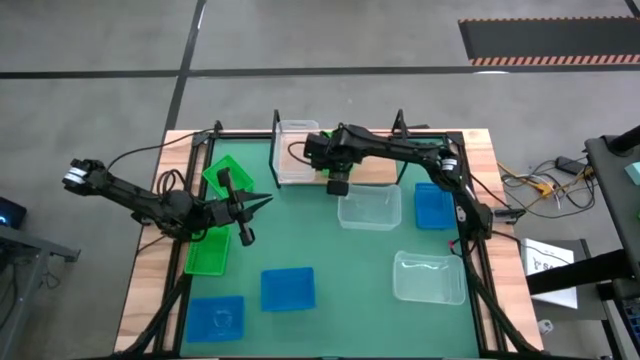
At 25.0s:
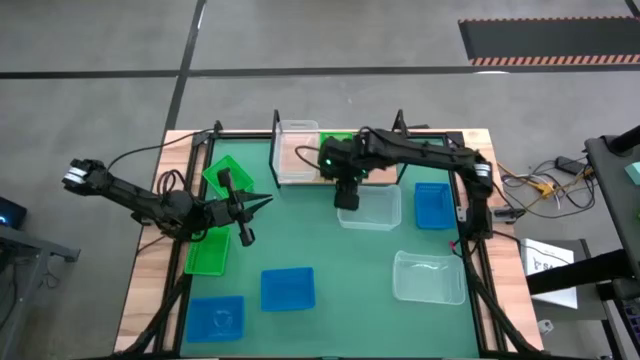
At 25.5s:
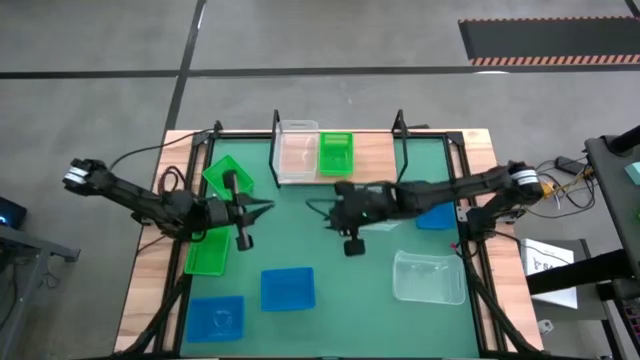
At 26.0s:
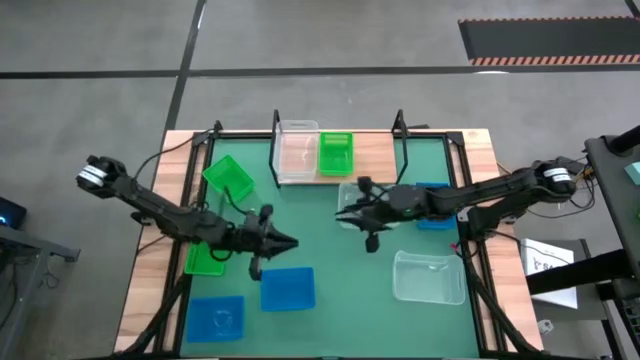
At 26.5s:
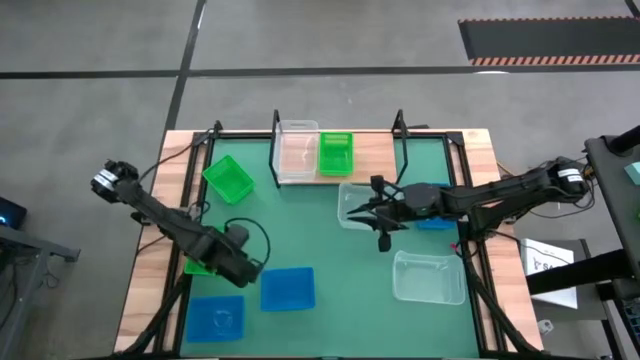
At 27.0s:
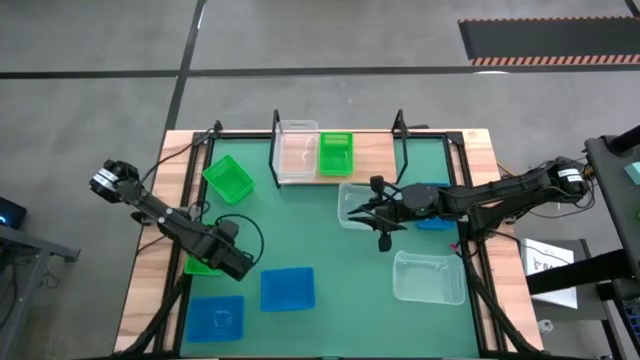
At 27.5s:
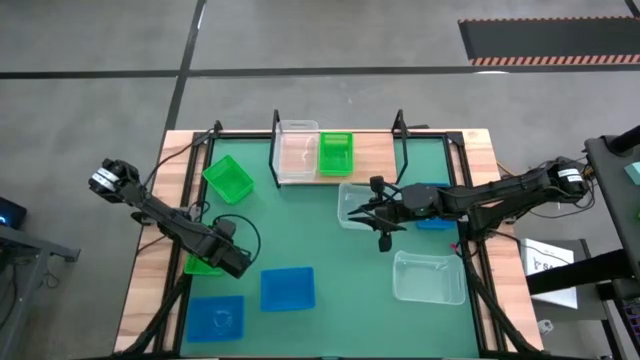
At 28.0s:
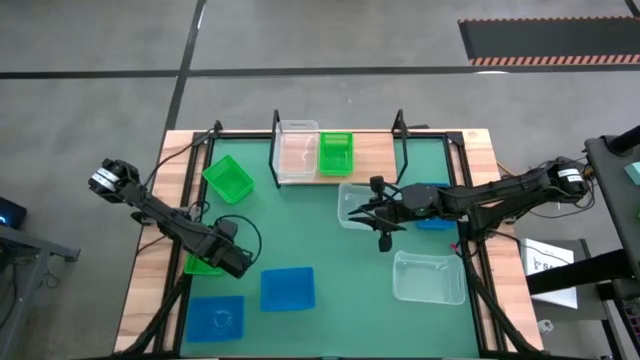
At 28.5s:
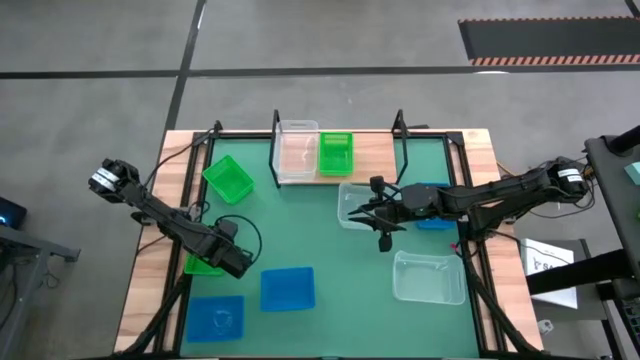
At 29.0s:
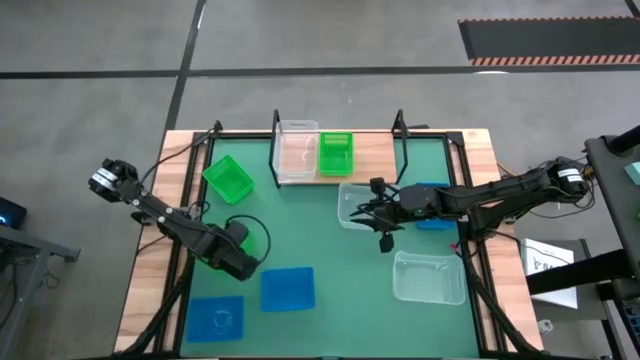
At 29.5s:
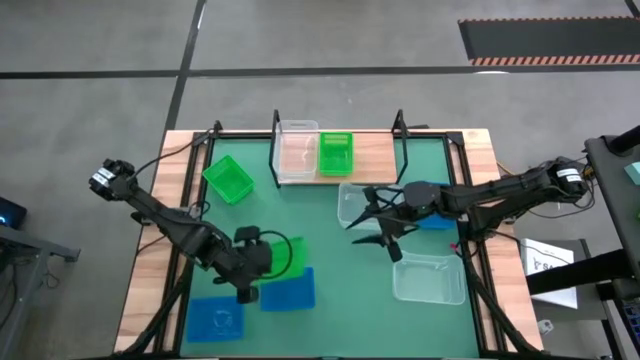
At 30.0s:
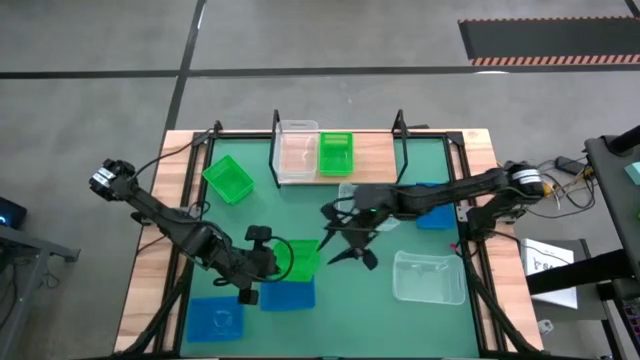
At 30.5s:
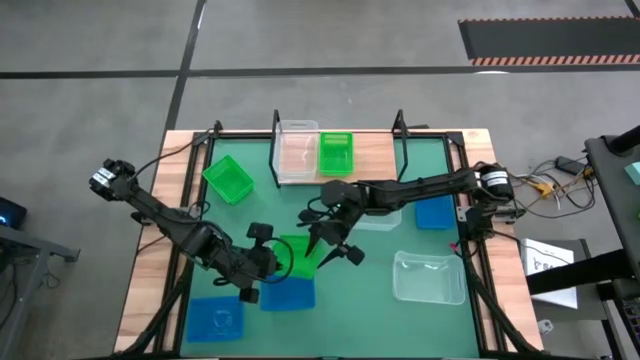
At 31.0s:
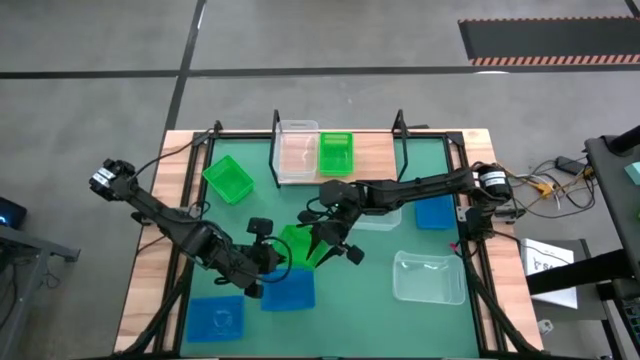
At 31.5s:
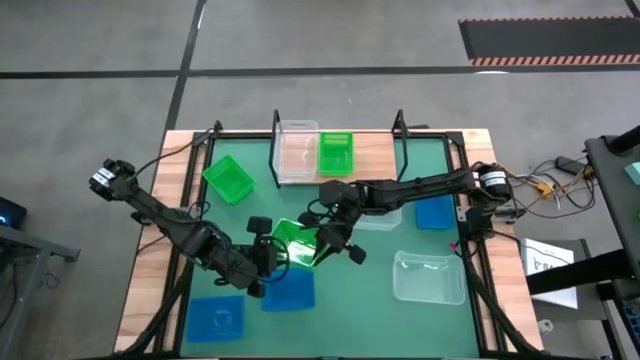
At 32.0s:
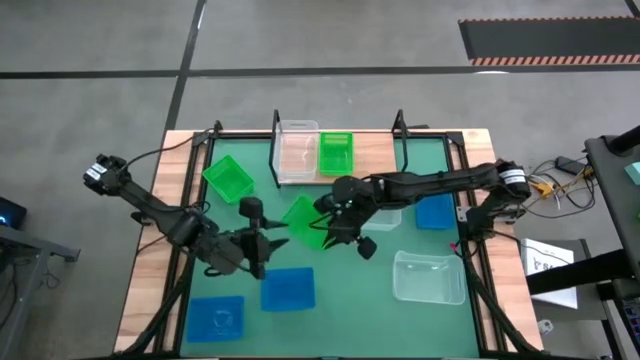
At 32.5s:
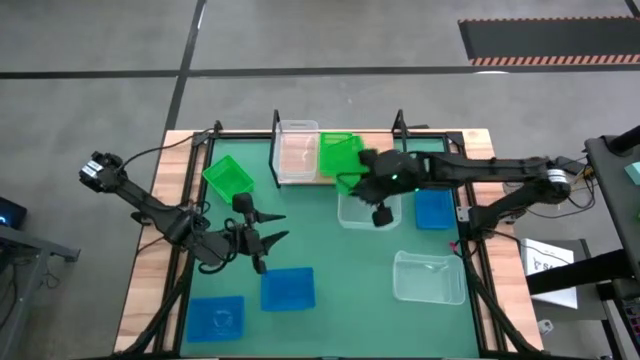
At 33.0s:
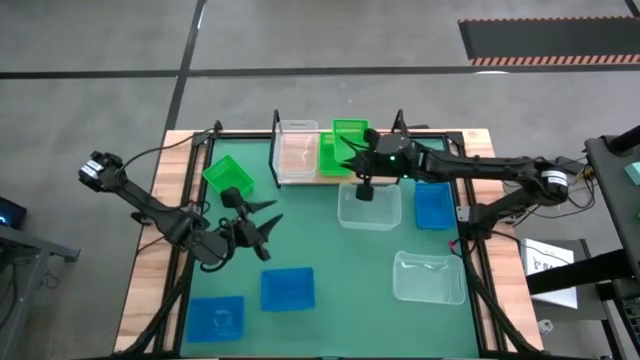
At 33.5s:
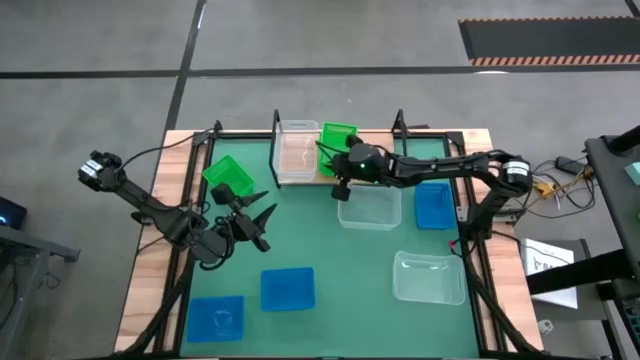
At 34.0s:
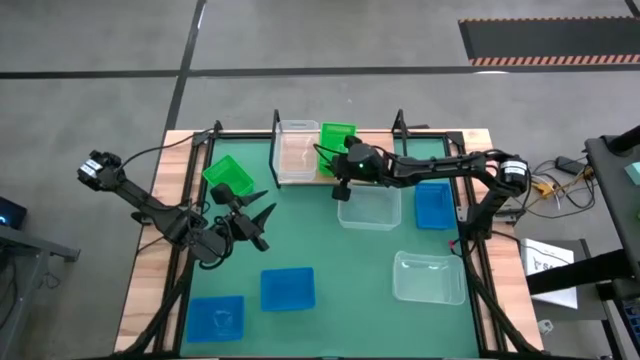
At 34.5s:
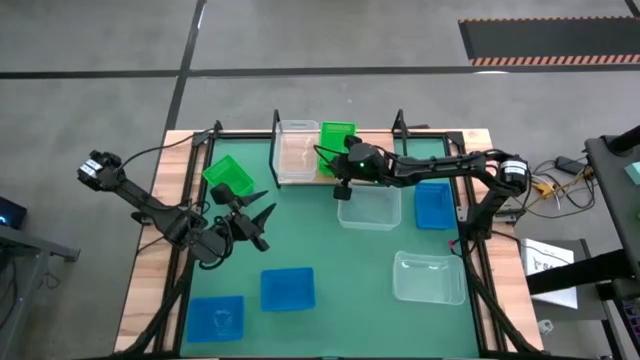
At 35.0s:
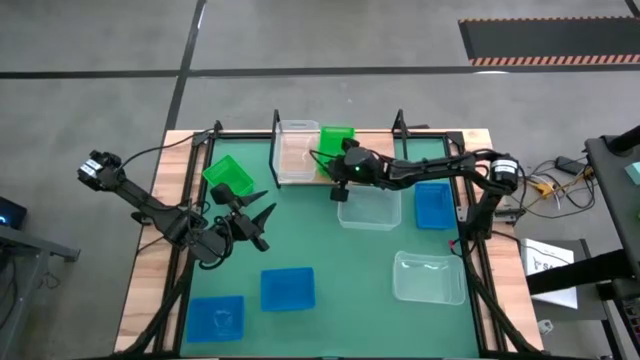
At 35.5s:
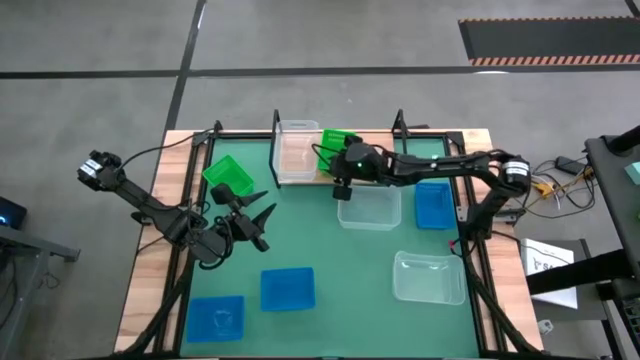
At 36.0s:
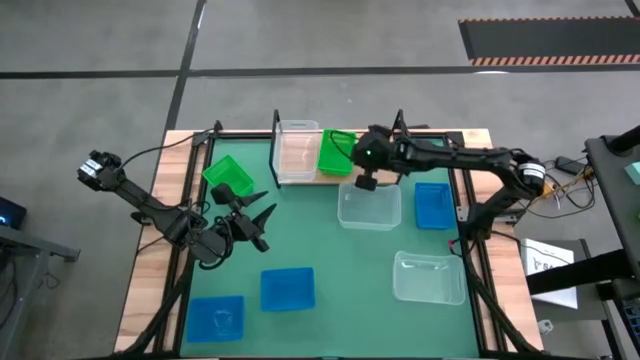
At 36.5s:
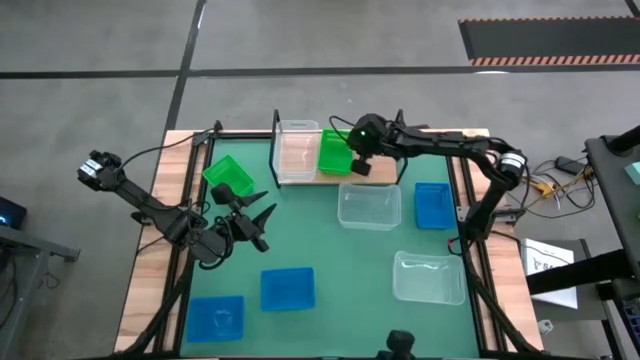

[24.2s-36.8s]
Task: Stack baskets on shelf by color
Stack the bottom green bin on the green bin on the shelf

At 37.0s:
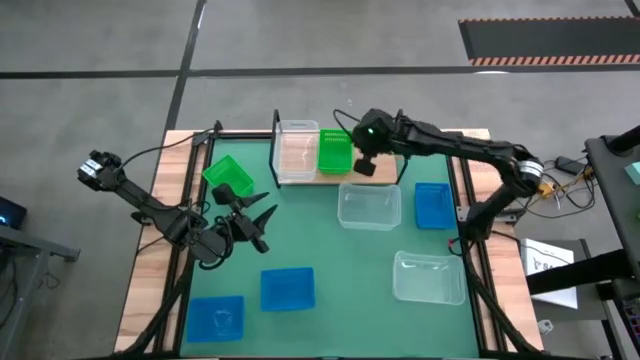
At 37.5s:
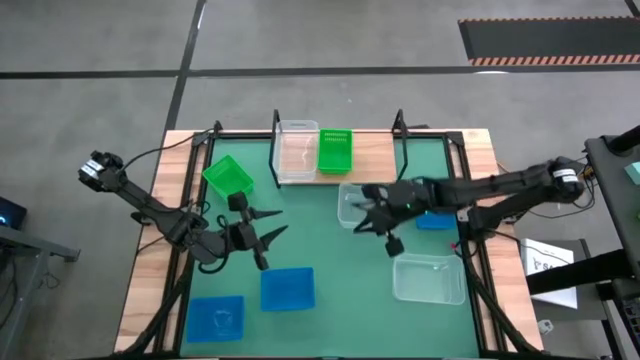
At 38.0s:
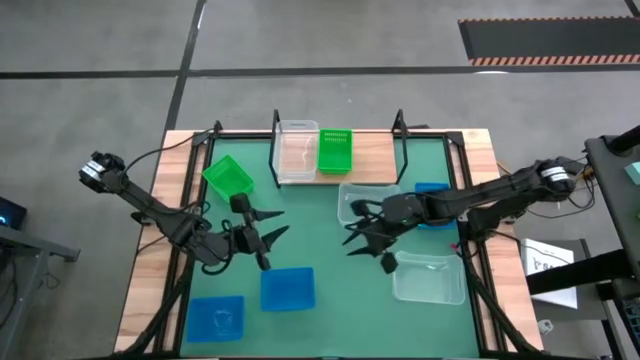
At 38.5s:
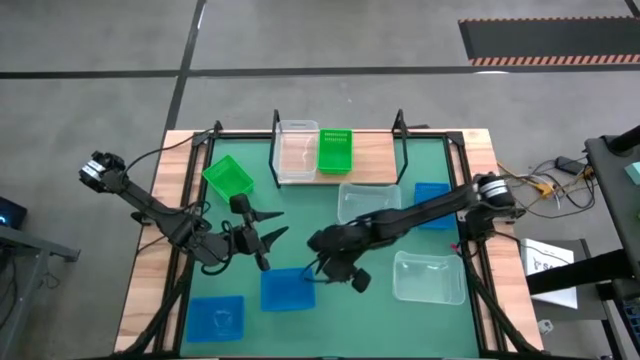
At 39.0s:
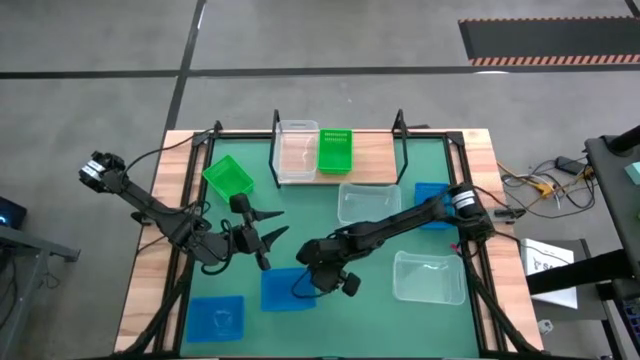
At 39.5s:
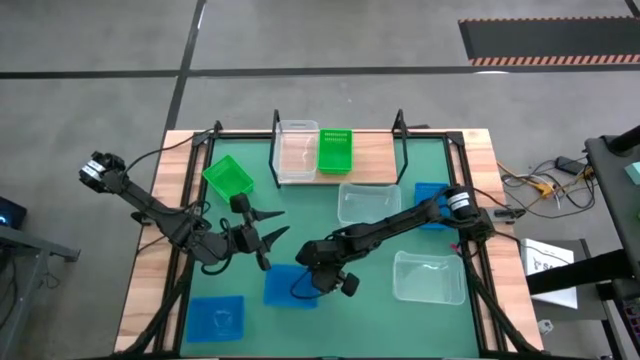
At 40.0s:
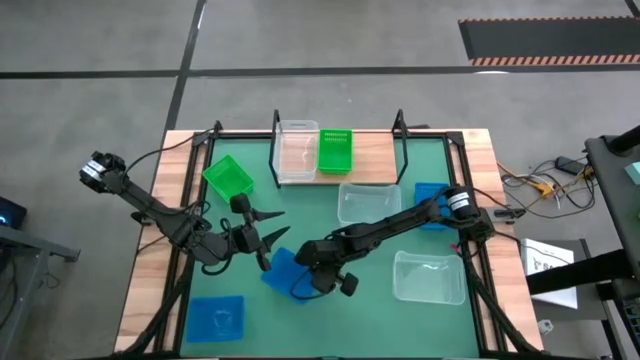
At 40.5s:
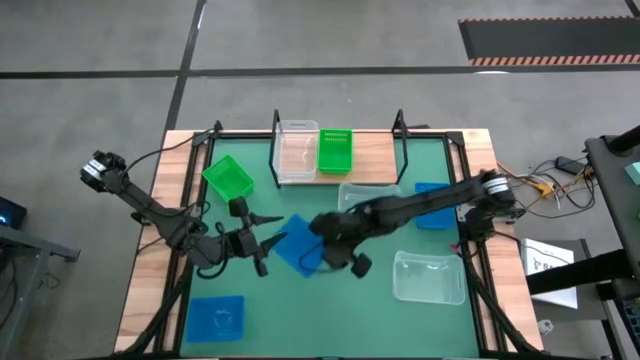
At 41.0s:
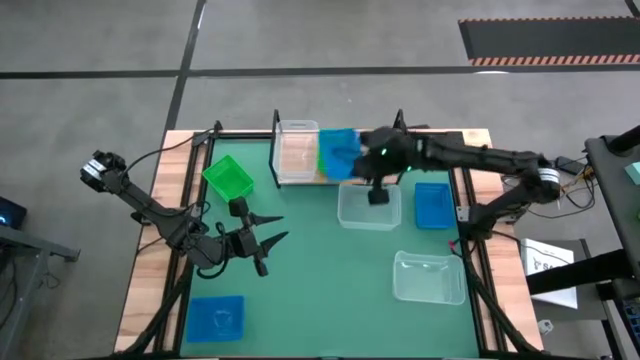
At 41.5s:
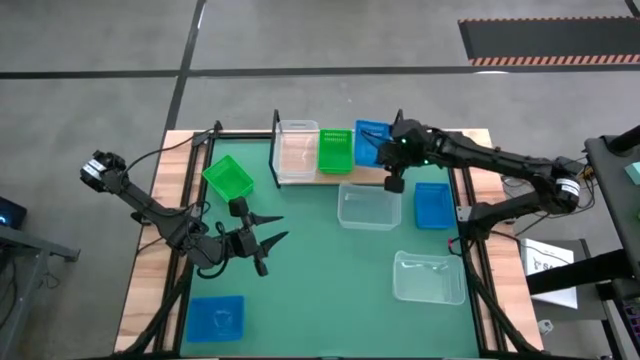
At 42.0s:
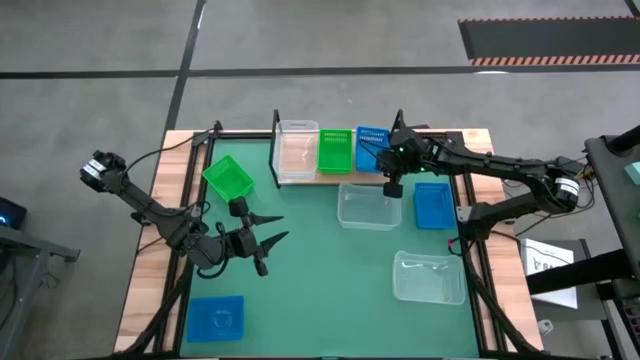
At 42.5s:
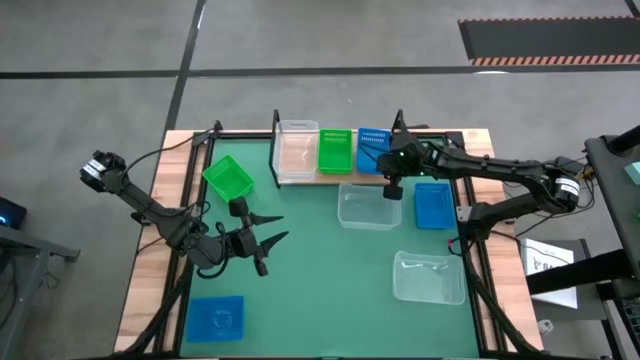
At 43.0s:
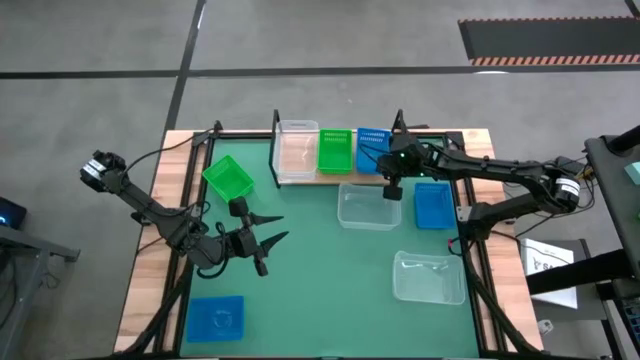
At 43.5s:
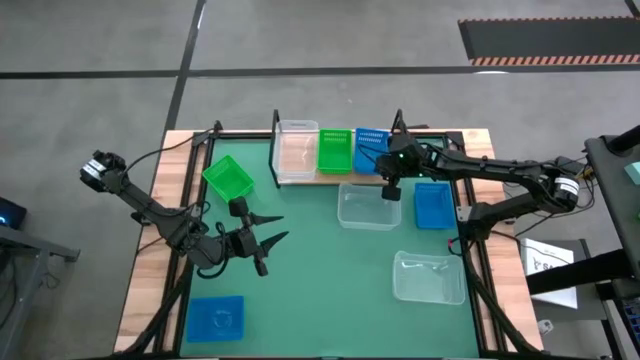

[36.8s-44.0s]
Put the bottom right blue bin on the shelf

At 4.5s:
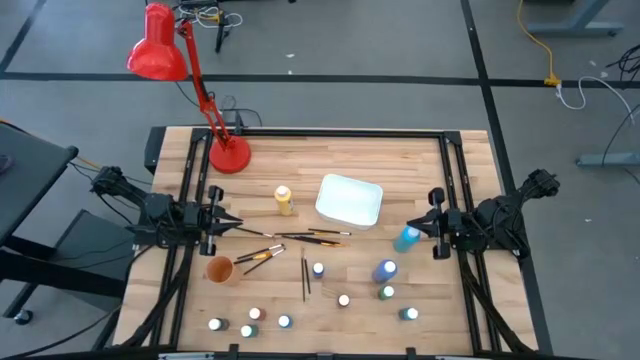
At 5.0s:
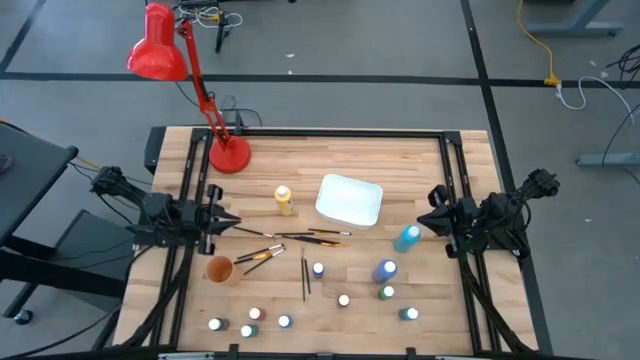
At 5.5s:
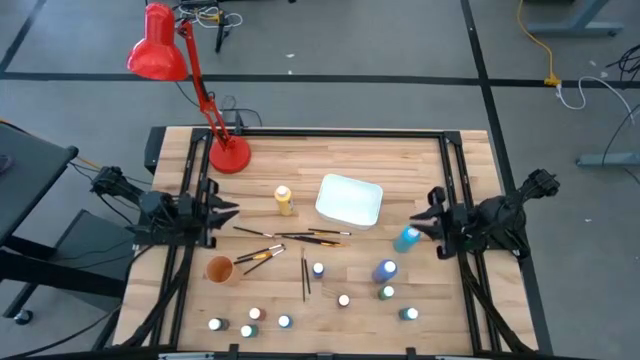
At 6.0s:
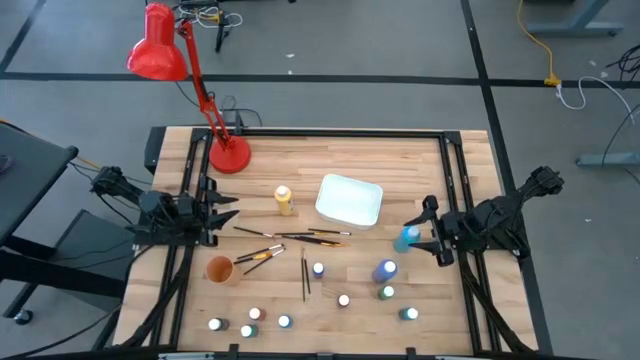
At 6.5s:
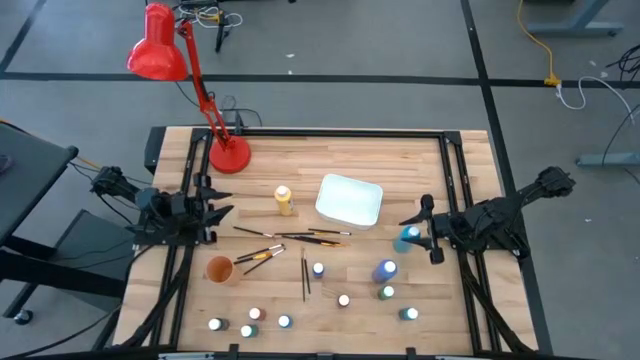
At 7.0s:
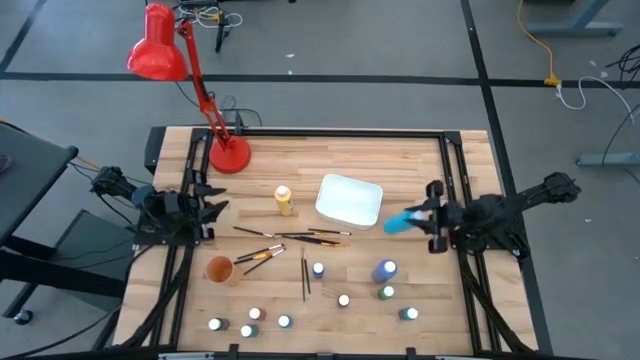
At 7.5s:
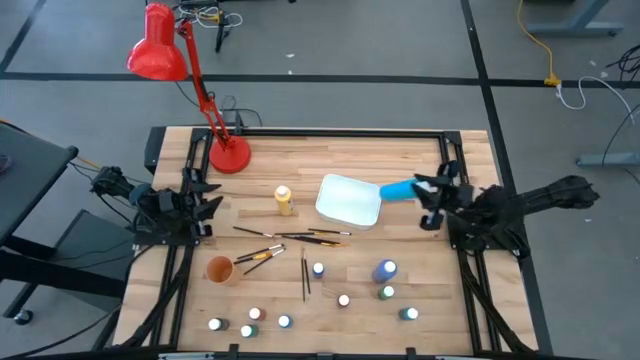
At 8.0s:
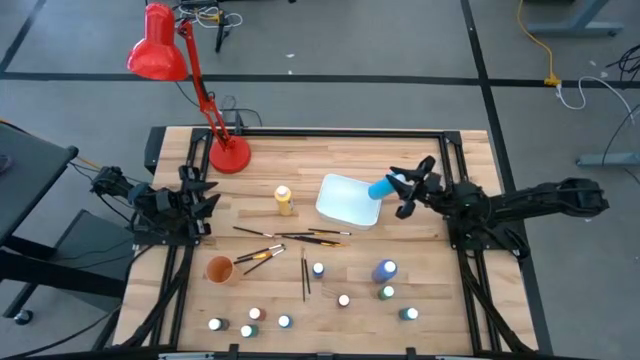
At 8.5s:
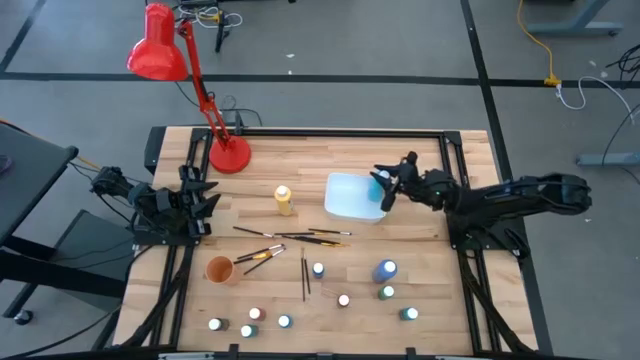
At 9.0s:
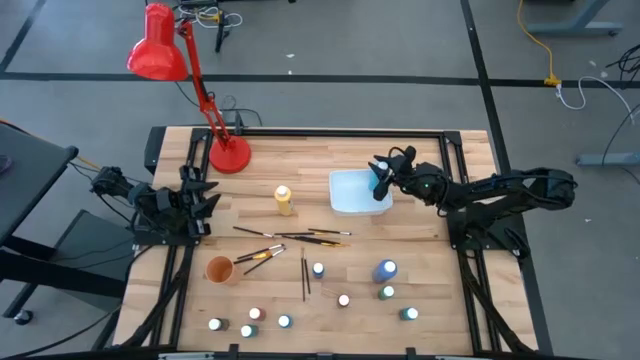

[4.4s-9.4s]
Task: Pick & Place Paint Supplies
Put the large light blue paint bottle into the white bin
